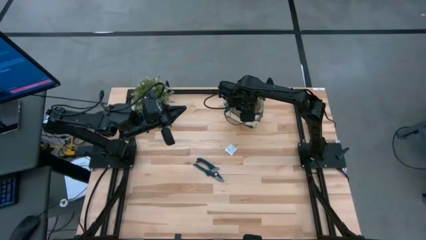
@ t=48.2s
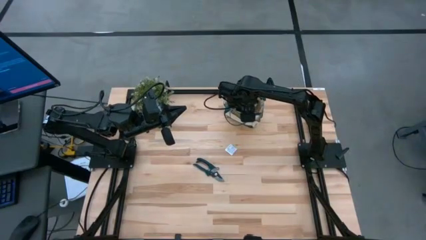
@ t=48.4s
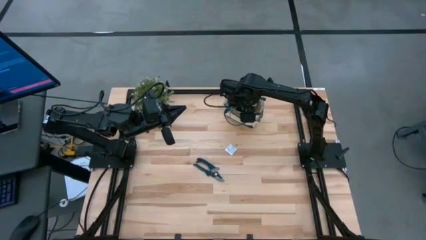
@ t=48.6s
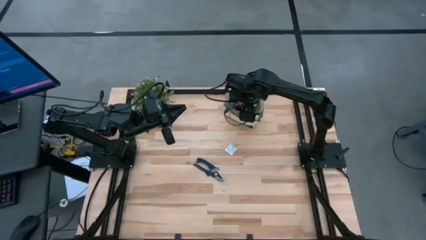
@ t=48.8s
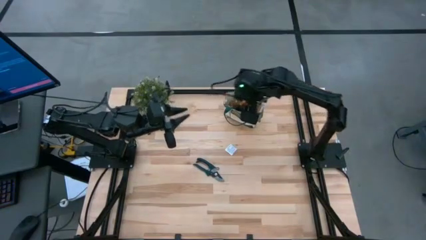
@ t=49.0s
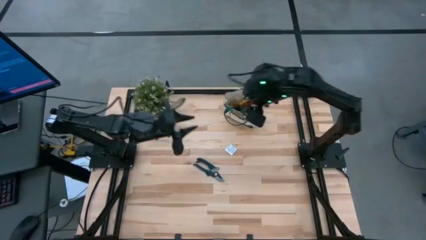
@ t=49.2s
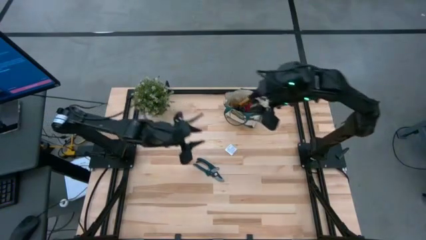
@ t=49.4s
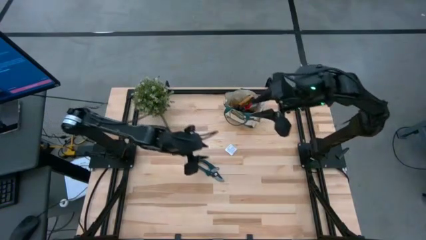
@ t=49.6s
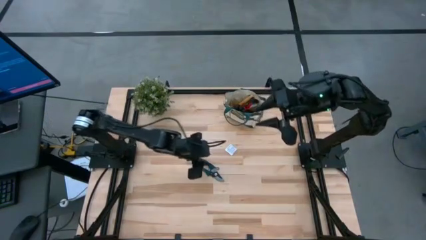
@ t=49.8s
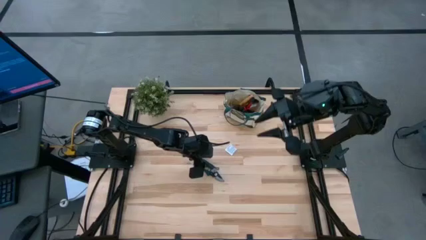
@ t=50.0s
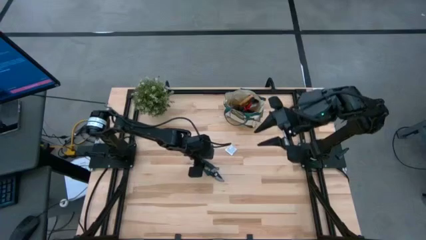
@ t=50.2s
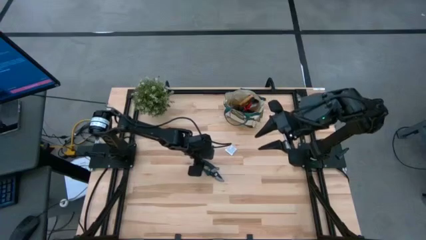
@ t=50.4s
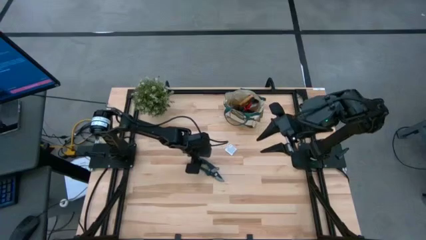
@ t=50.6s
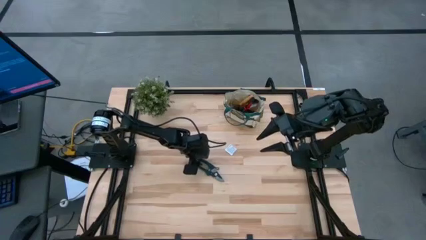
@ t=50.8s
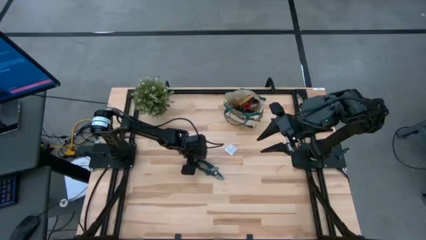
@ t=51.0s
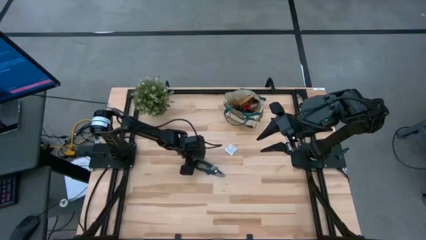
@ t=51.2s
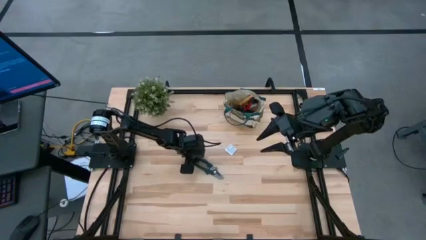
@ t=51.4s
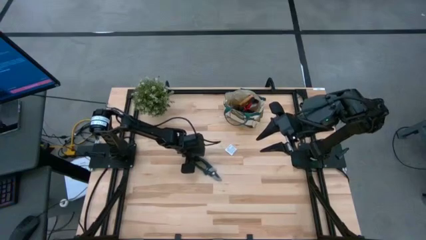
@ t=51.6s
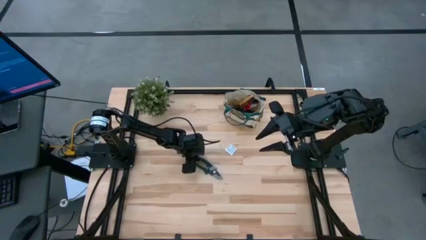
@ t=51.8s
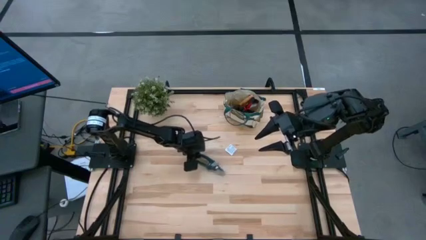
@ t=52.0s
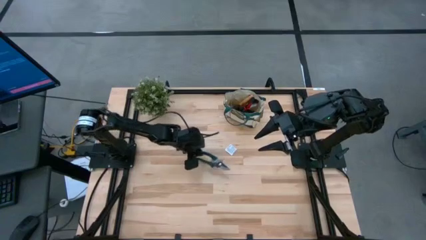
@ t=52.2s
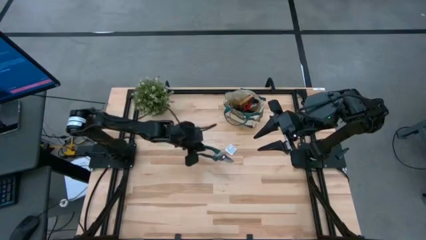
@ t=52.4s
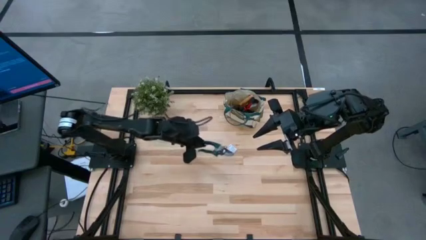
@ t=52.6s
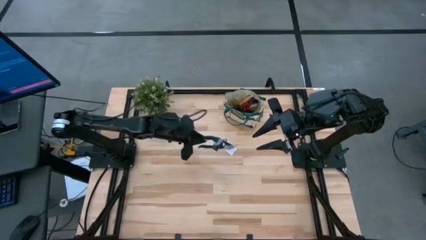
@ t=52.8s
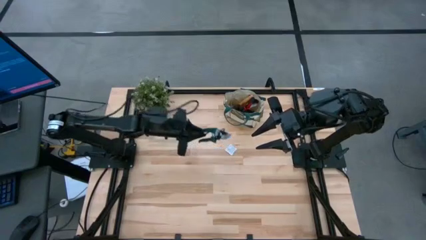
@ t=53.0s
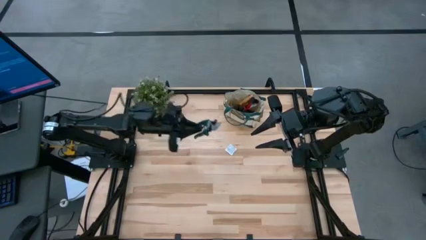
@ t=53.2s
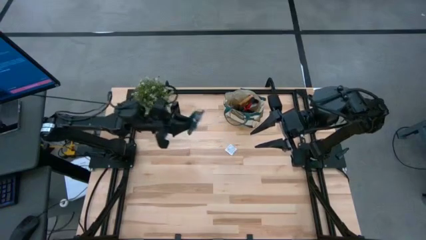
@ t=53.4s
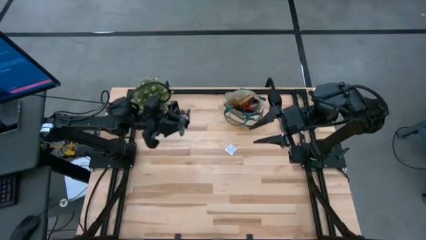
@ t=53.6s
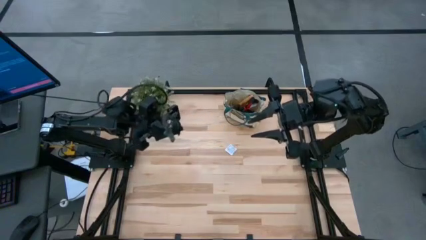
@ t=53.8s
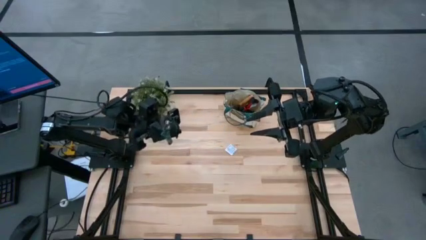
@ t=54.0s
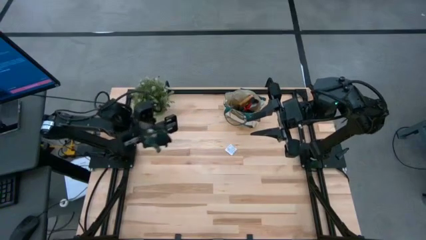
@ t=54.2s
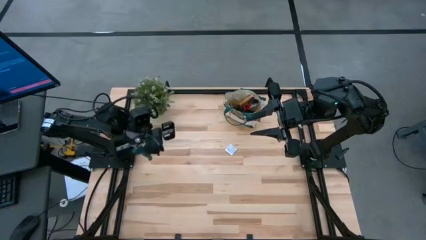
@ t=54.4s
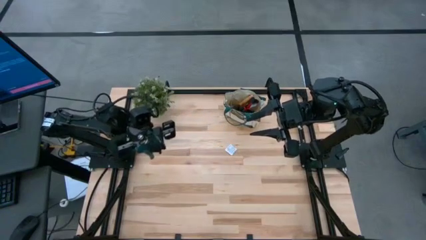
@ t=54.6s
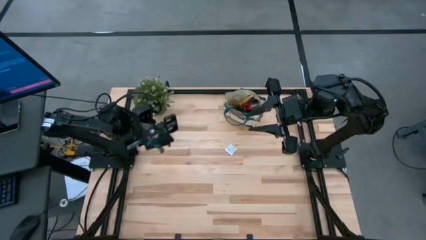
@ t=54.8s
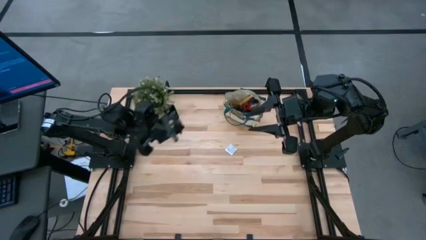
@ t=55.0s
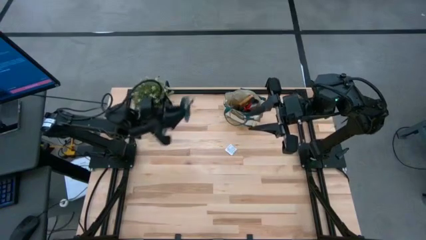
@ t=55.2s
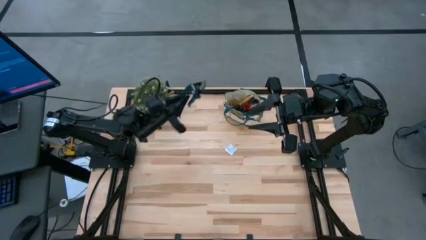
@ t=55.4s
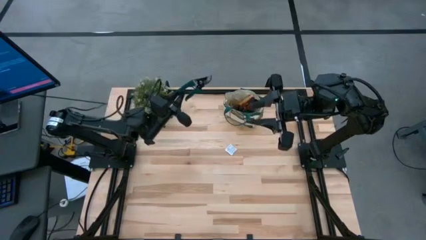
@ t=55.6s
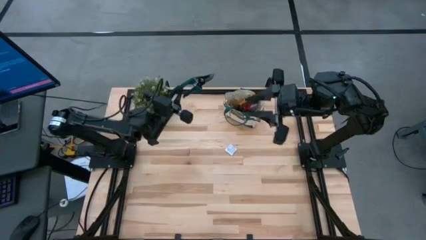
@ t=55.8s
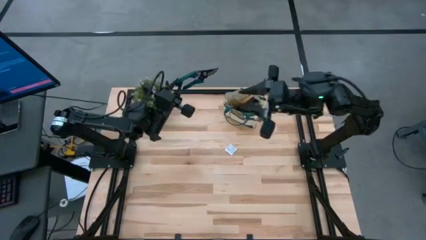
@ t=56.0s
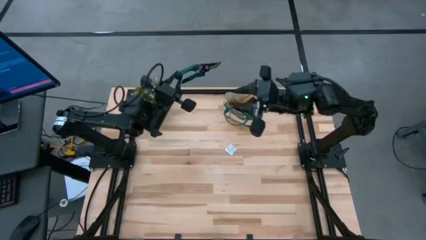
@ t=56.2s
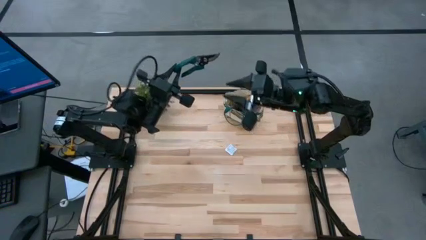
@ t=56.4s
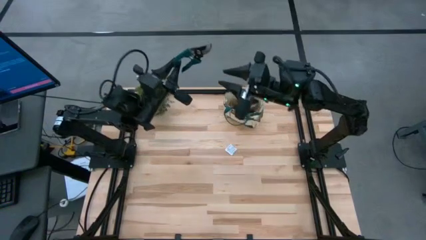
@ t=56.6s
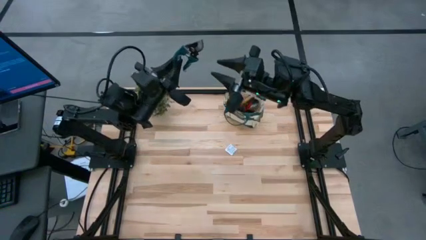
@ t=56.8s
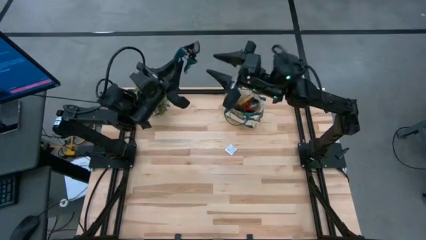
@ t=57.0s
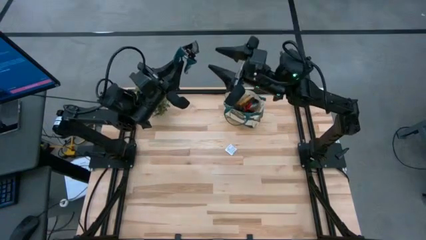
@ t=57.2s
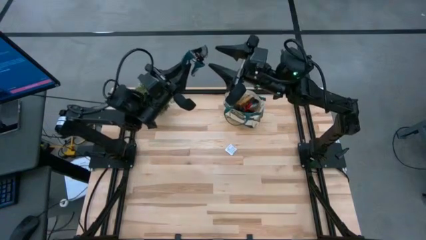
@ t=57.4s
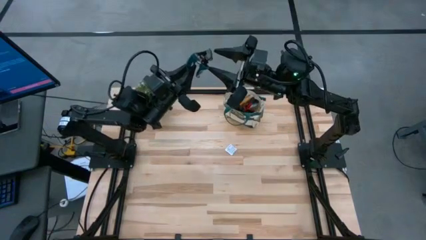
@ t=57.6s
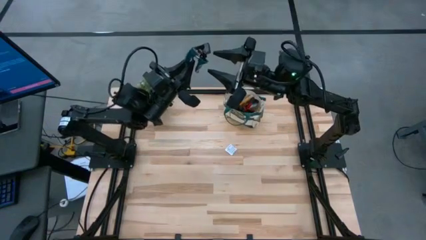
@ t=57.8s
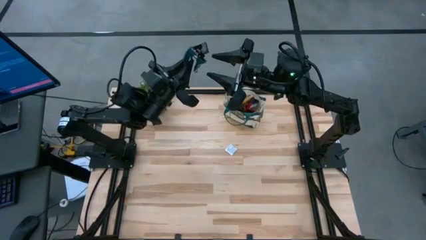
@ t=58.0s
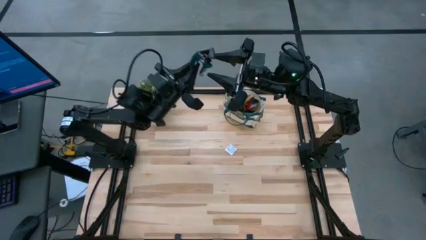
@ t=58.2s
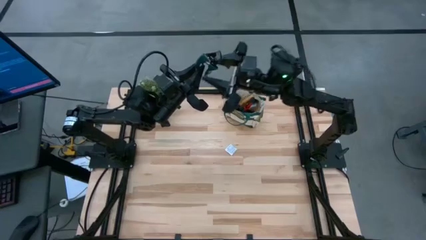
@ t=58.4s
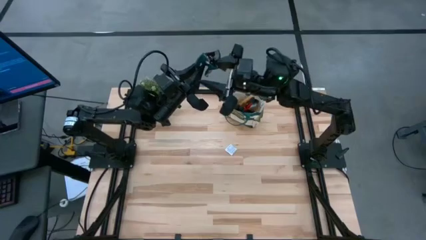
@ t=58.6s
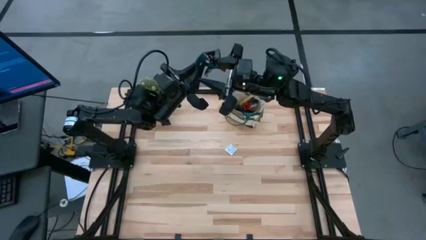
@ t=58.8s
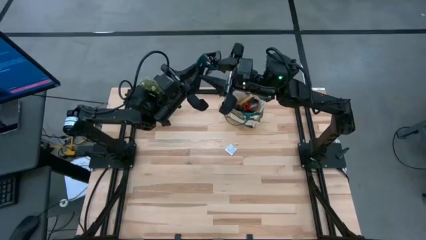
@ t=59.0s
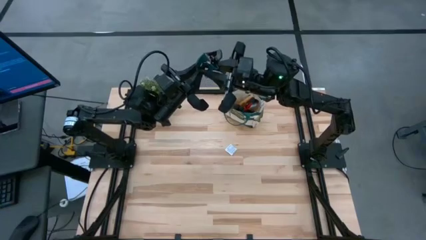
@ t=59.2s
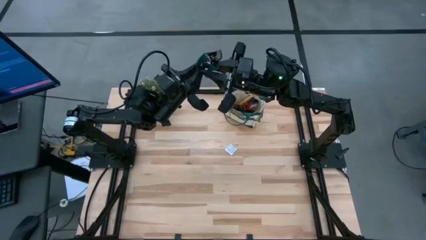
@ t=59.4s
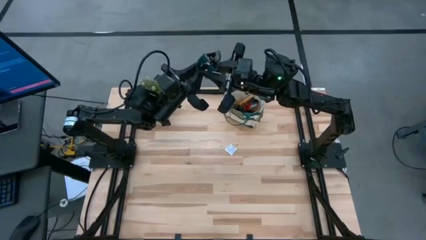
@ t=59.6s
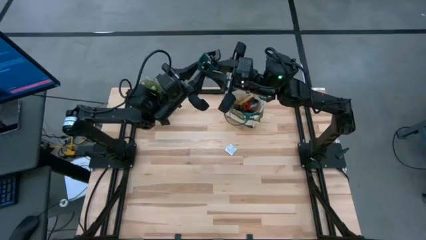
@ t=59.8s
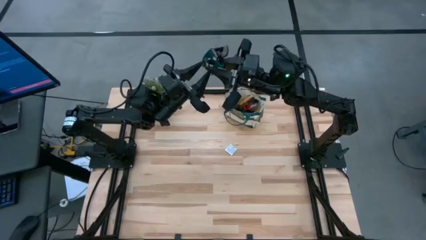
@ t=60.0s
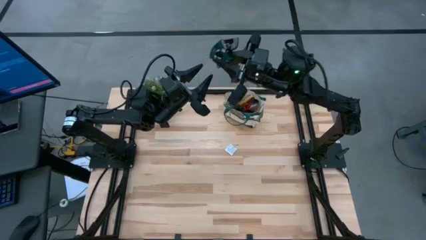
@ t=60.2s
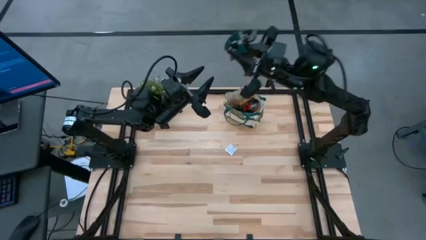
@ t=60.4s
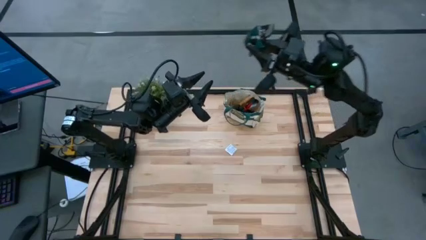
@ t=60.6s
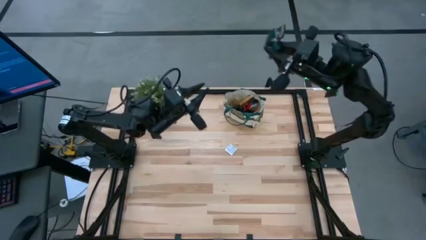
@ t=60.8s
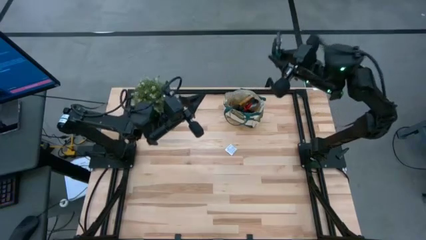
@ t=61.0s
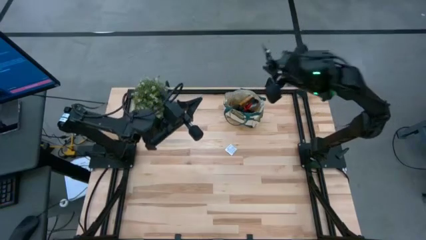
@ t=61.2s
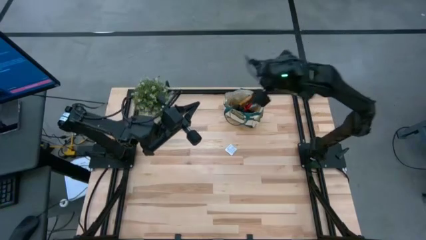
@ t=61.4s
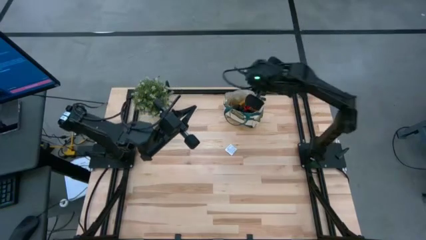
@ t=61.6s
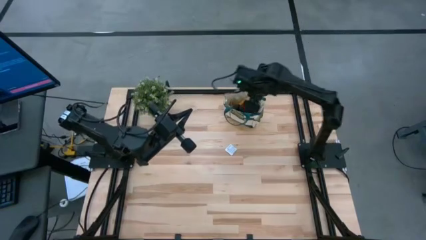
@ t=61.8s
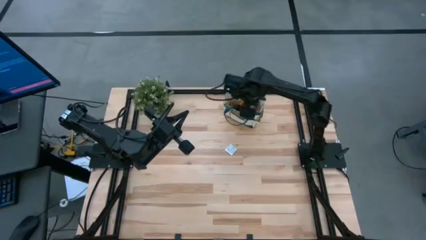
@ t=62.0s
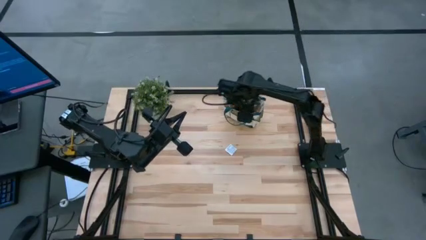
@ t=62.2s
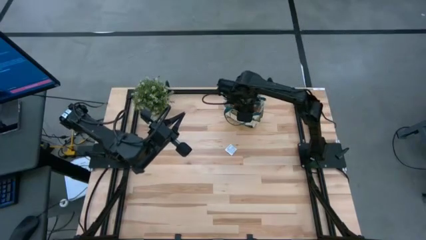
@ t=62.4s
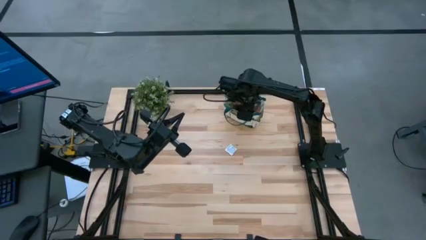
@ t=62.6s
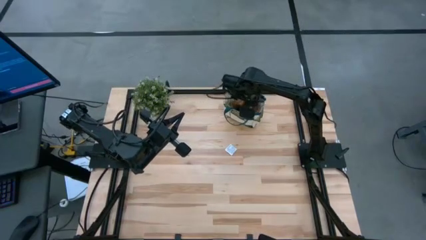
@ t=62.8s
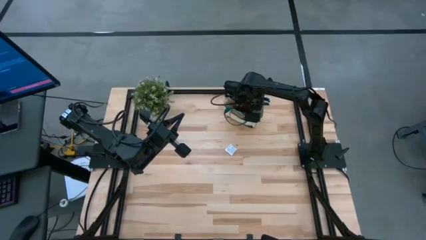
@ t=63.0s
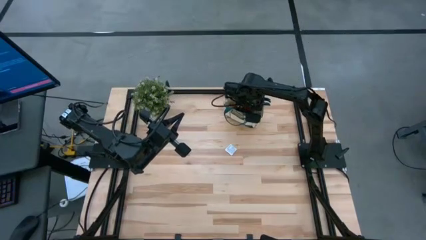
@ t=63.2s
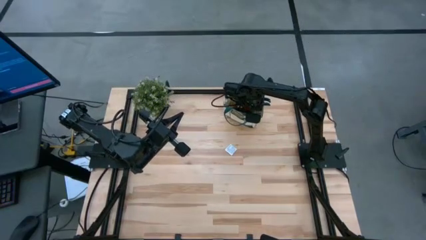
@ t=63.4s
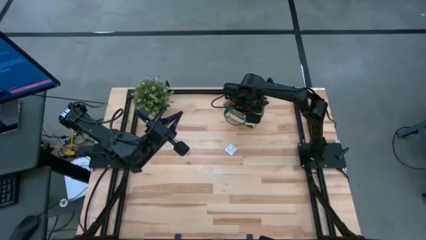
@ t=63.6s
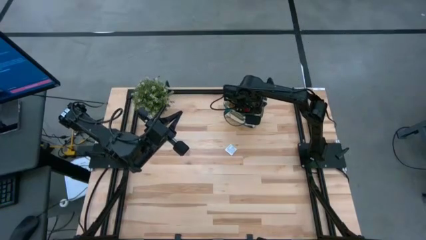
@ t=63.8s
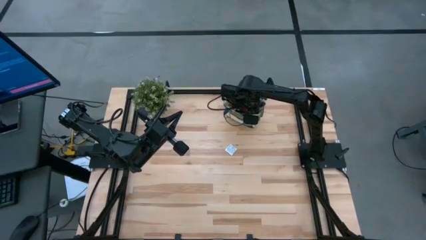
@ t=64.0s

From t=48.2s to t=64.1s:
Task: Pick & Place Garden tools in Gardening bag
Put the green shear scissors into the gardening bag
